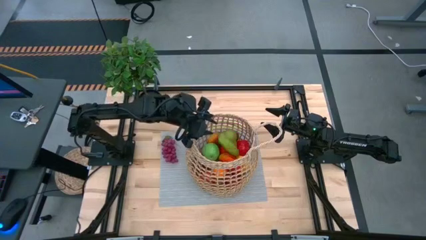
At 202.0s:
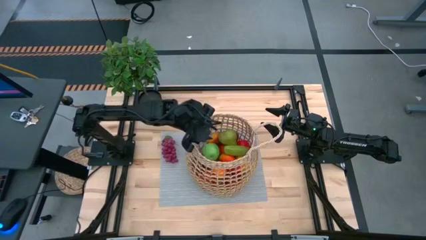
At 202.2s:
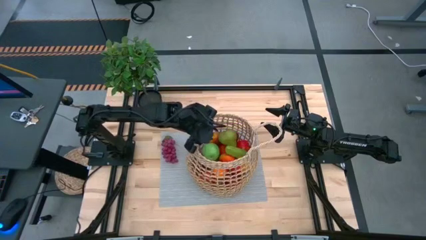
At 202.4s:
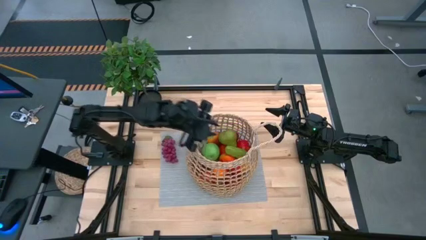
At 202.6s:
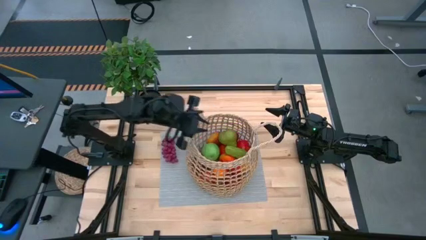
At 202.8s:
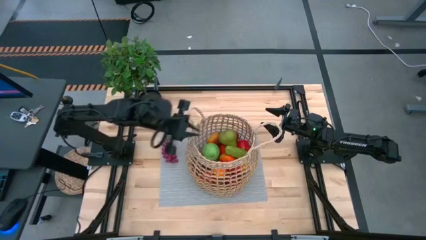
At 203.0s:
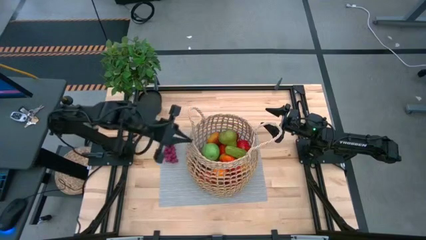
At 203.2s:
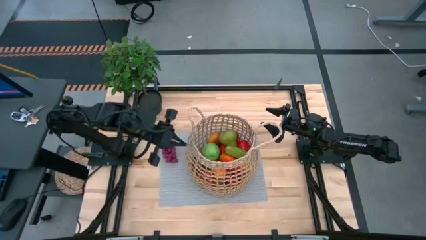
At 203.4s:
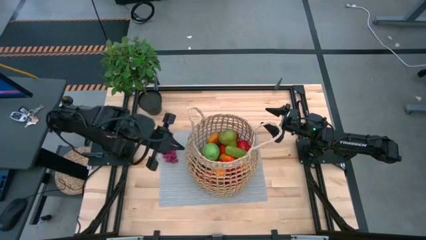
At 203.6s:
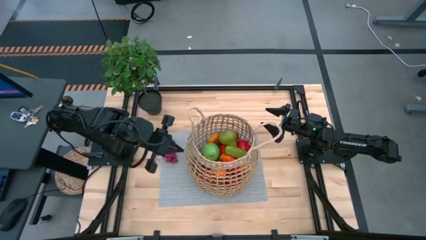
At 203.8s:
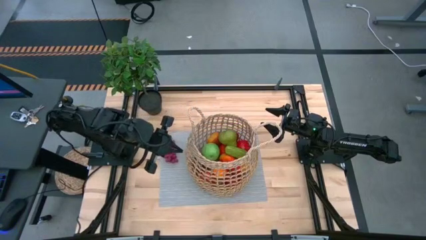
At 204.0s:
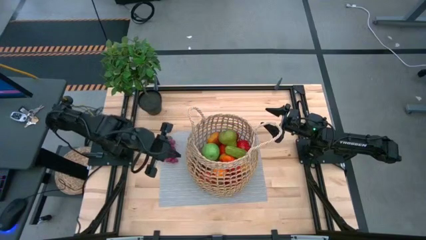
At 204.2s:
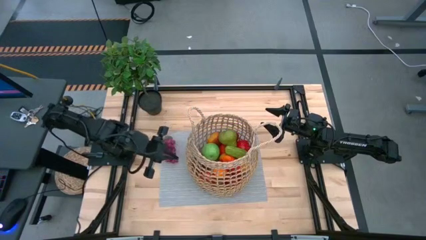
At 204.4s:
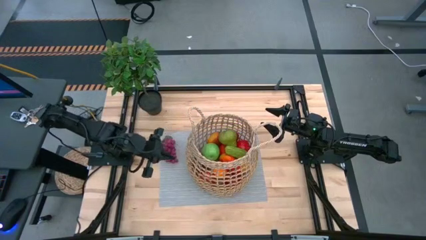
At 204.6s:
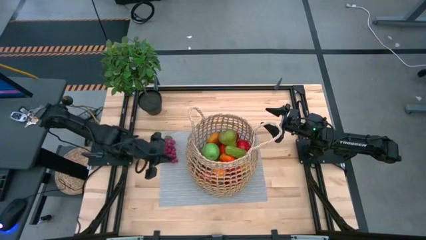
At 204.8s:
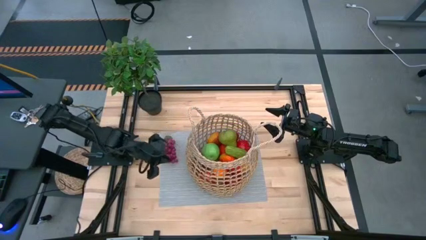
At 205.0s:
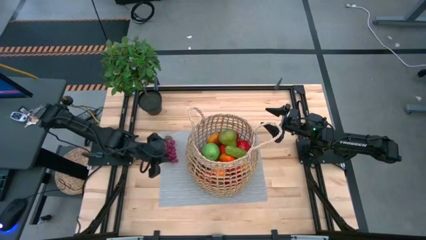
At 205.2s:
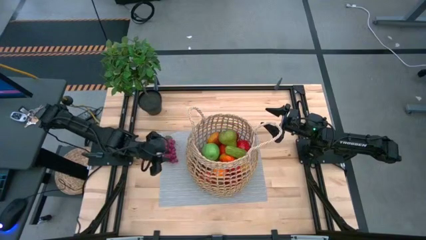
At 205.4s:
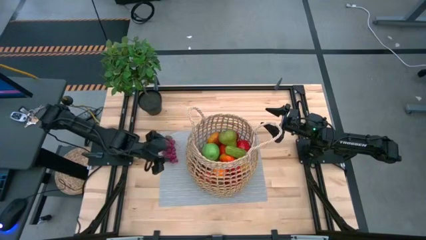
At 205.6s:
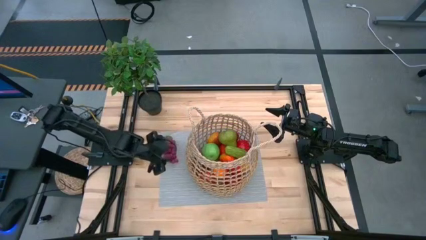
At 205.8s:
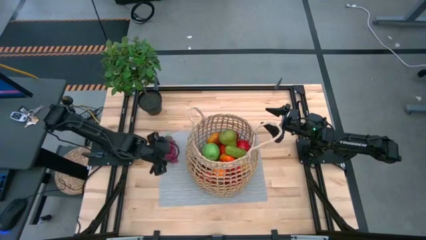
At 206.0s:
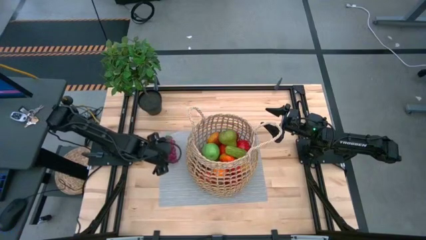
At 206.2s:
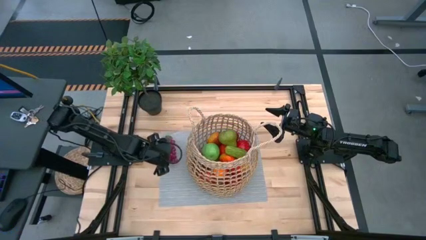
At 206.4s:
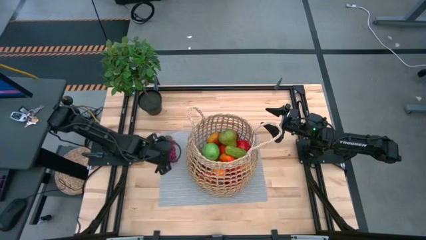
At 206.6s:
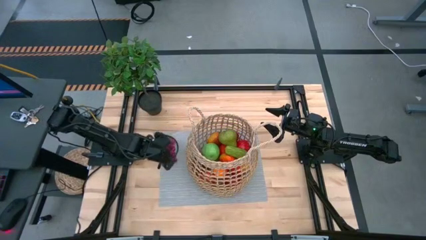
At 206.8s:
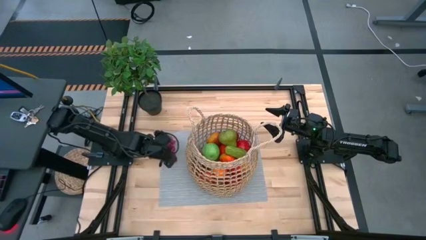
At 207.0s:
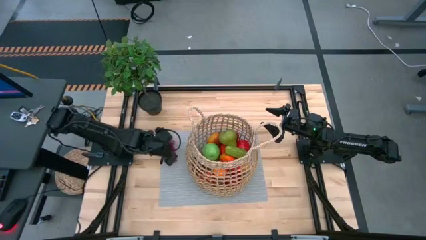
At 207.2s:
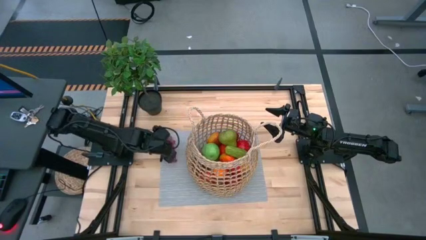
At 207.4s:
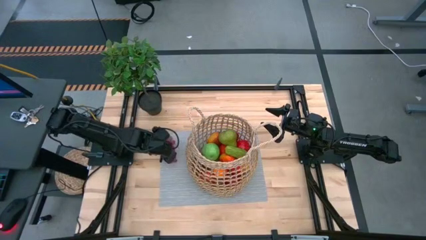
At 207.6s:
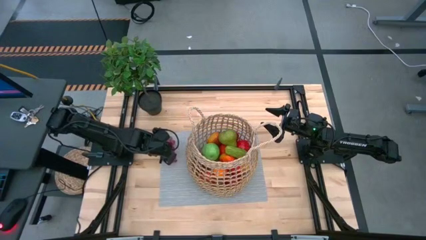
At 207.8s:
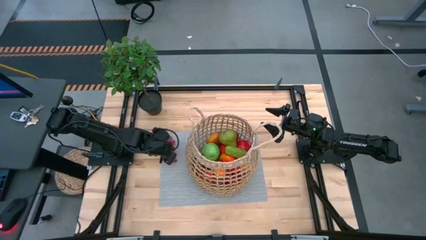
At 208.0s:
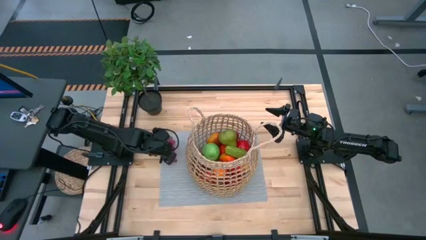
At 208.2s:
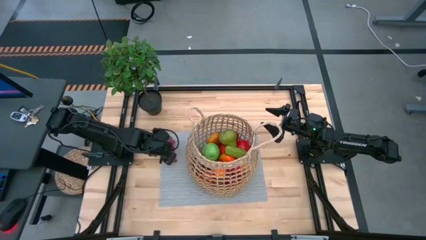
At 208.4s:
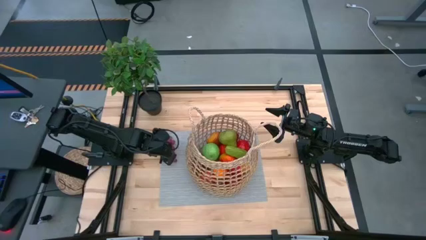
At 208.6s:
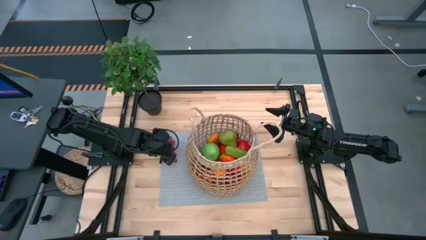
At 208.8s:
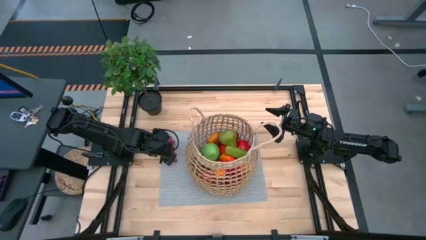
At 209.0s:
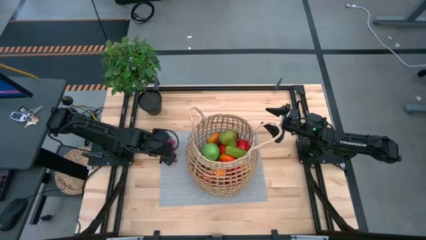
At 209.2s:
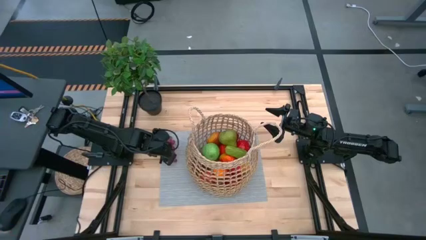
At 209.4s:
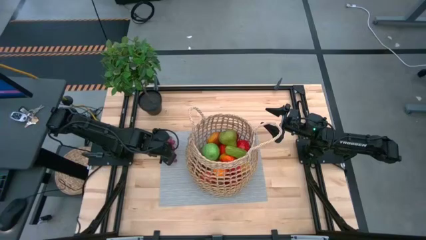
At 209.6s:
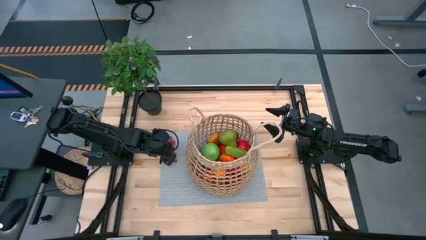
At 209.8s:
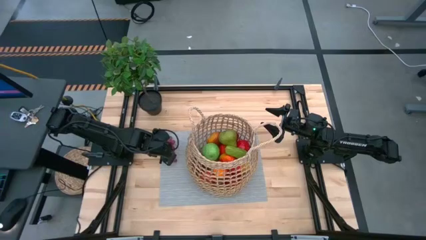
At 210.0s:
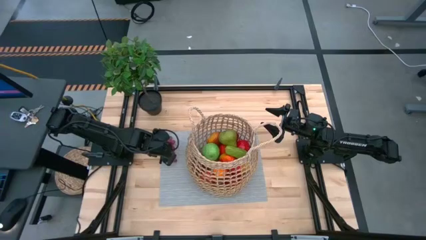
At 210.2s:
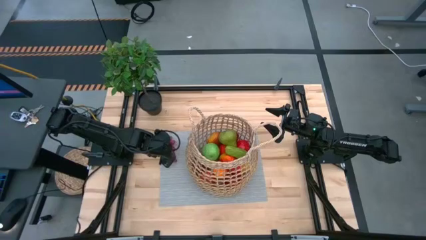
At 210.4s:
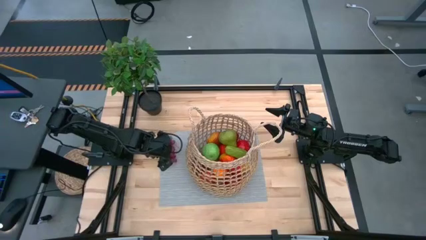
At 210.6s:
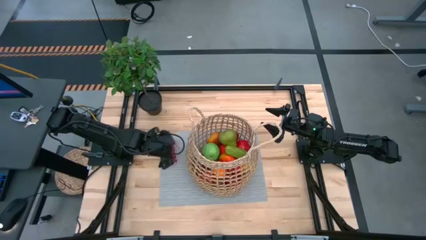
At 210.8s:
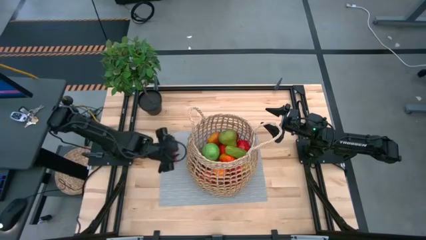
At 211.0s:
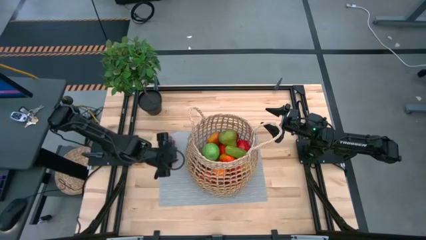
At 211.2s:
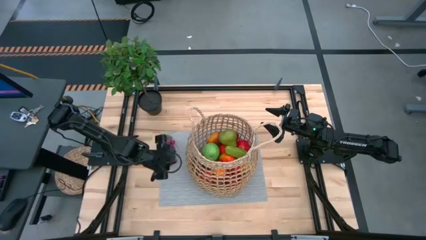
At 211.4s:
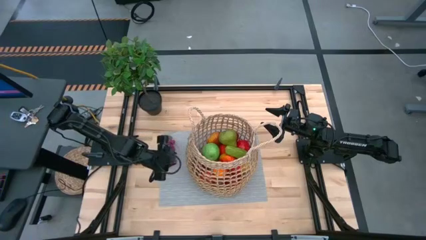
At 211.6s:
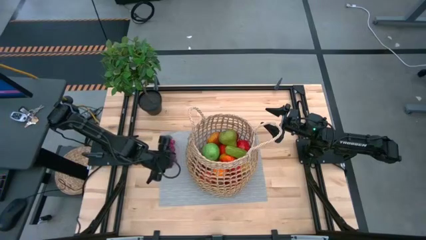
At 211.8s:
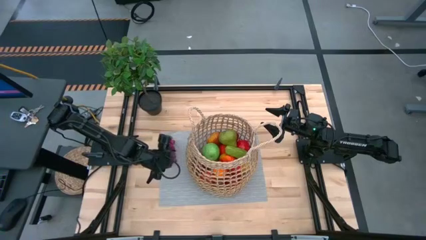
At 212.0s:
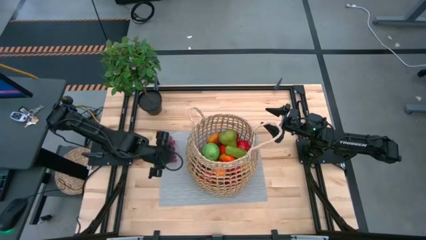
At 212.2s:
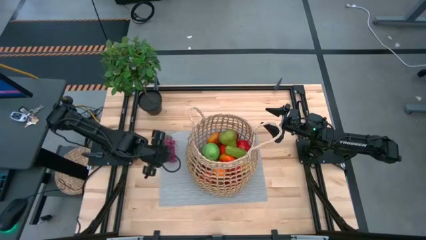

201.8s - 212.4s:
Task: Build produce basket
Put the violet grapes into the brown basket

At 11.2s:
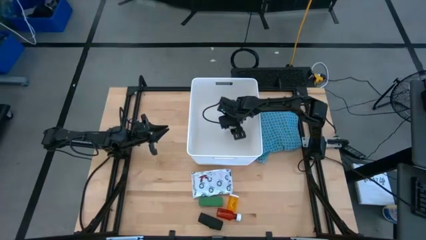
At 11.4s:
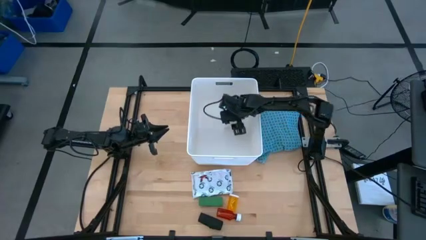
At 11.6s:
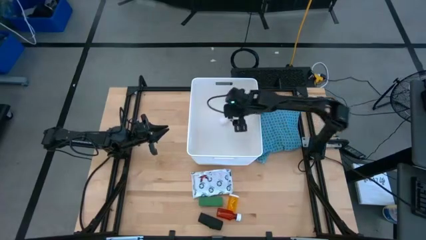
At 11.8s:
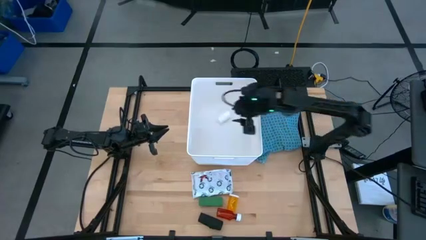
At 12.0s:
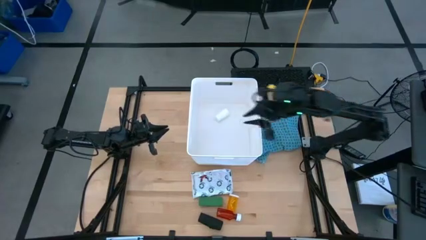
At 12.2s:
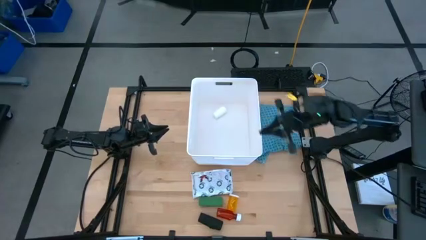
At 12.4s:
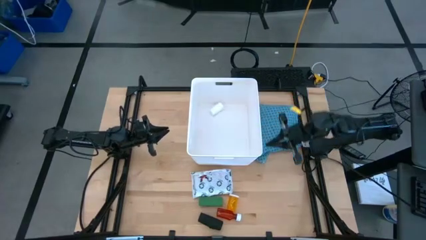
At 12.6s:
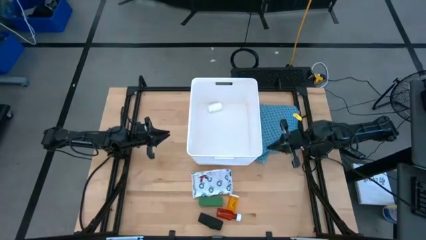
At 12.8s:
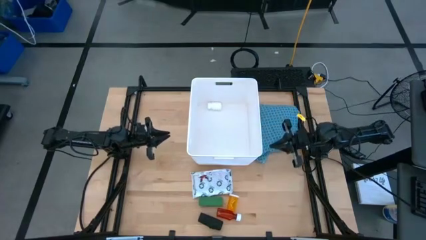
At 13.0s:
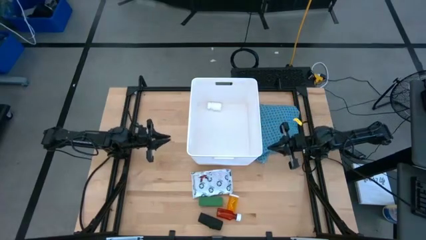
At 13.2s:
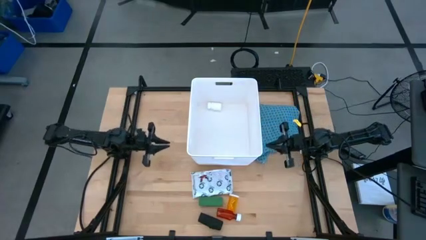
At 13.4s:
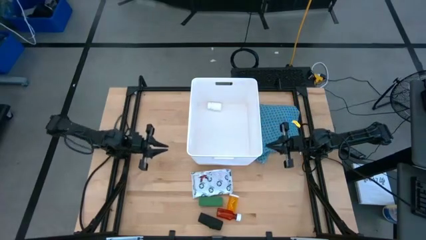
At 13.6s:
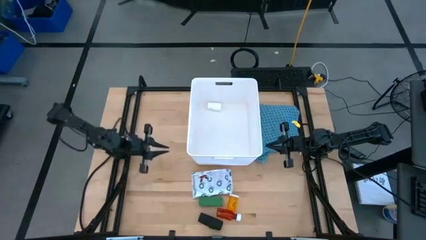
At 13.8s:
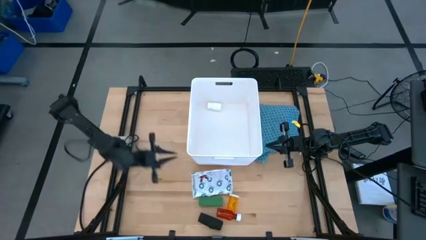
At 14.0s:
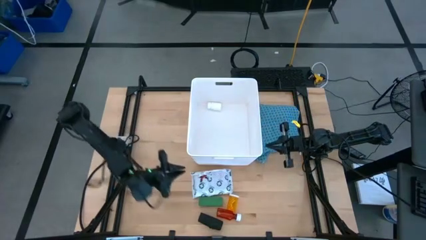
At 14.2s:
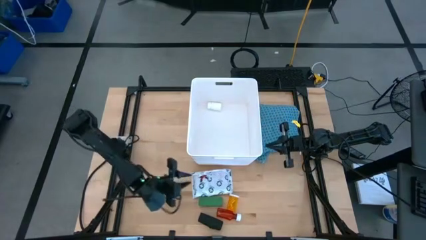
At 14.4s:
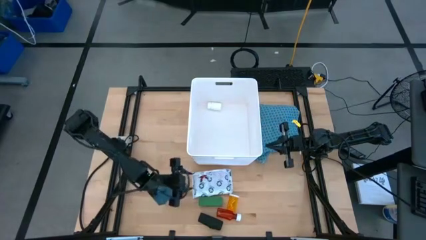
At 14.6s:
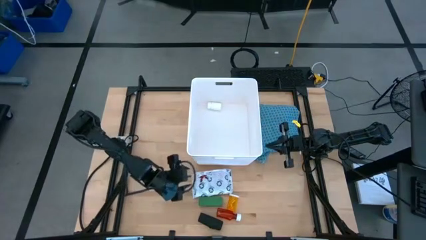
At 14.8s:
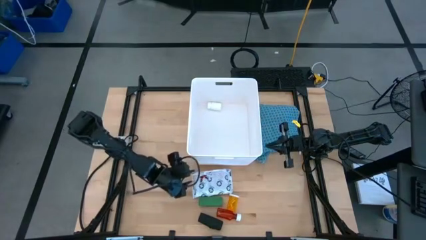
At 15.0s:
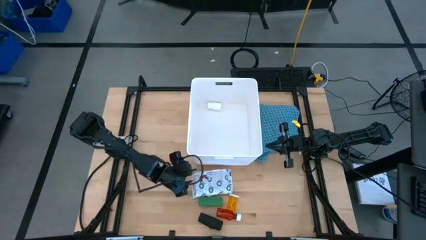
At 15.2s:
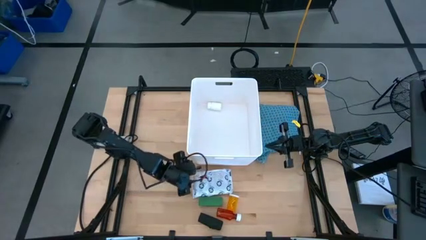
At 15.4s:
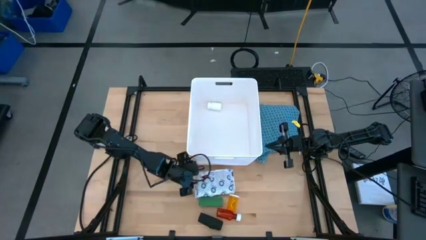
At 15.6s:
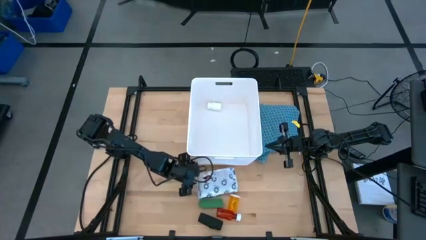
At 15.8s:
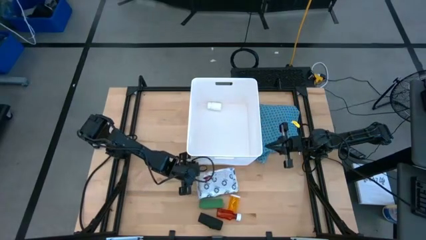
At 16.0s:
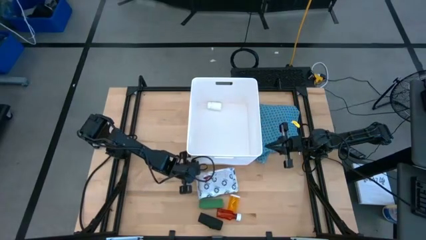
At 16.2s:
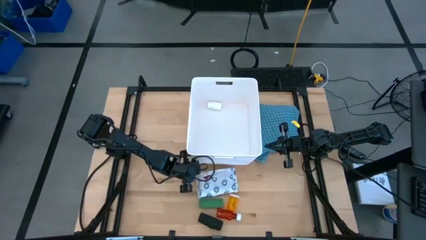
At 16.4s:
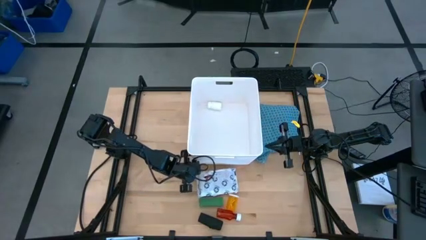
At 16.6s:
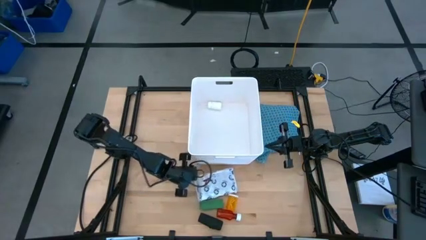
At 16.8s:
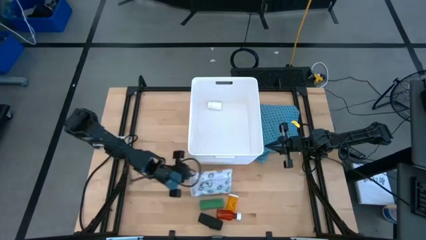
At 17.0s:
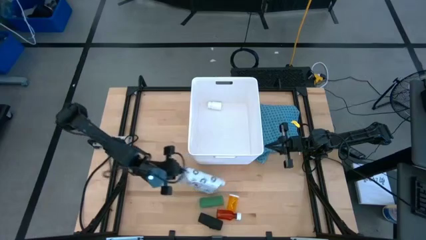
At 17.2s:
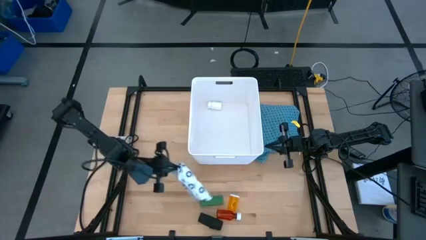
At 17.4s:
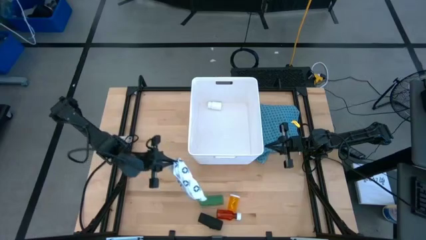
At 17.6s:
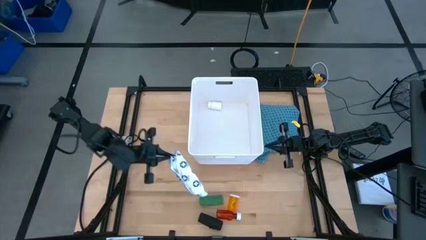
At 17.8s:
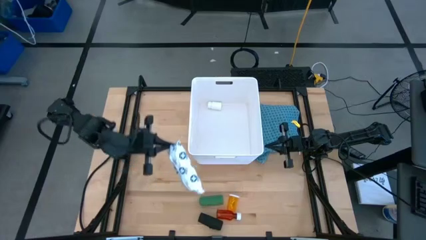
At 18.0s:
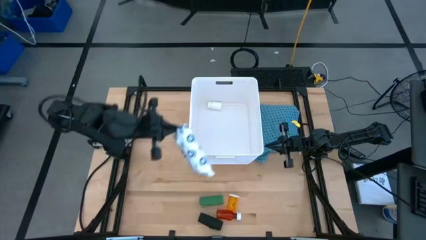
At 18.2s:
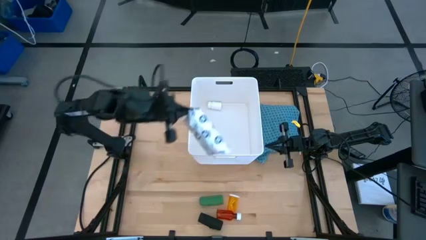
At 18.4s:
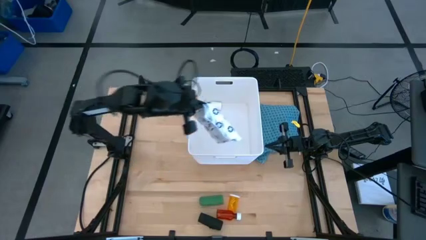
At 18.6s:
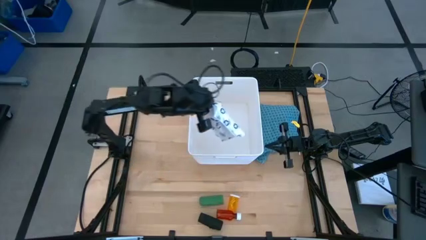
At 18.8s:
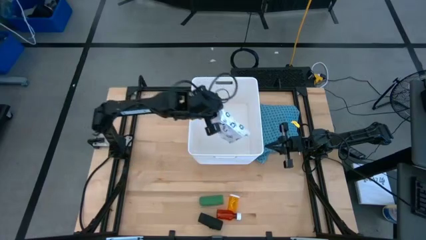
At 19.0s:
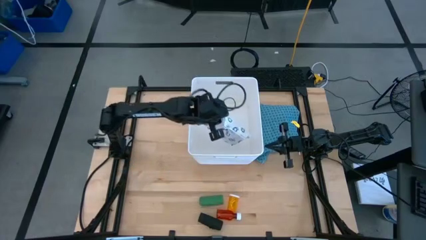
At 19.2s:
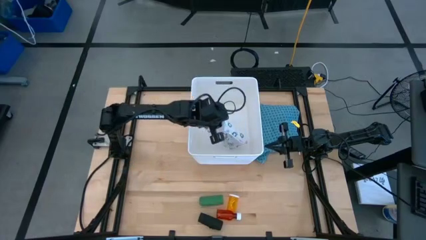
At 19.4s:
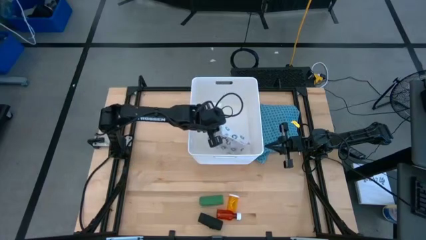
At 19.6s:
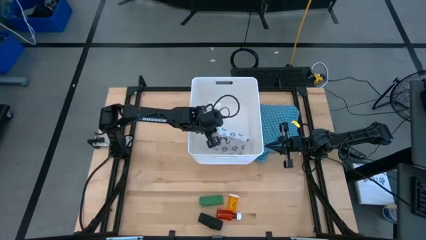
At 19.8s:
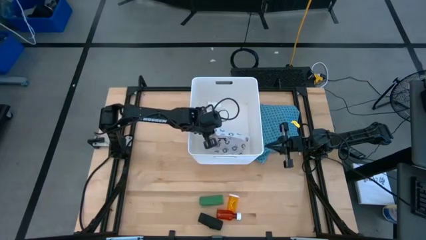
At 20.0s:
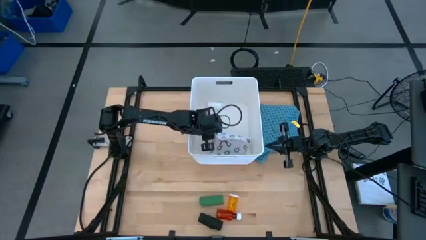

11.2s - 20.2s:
Task: Pick & place medical supplies in basket/bin
Put the mailer bag into the white bin
